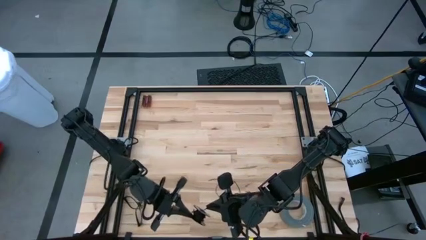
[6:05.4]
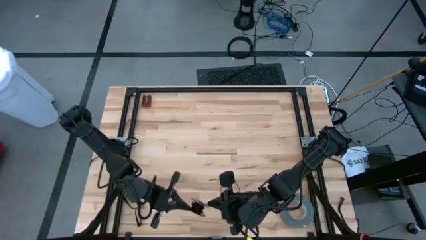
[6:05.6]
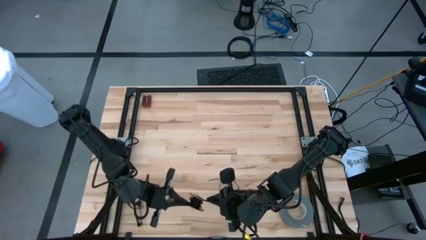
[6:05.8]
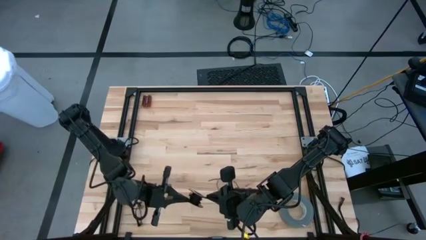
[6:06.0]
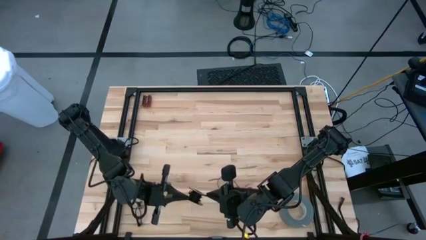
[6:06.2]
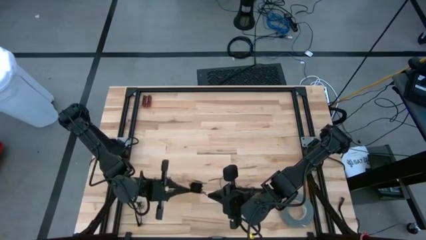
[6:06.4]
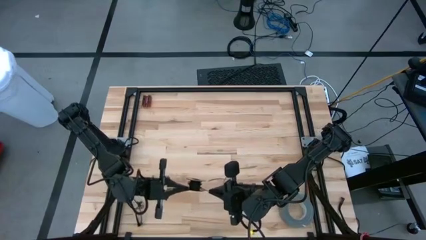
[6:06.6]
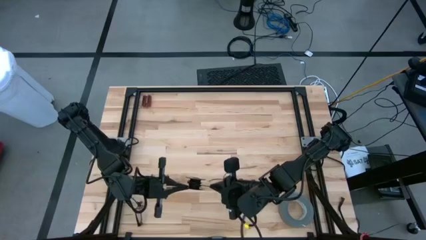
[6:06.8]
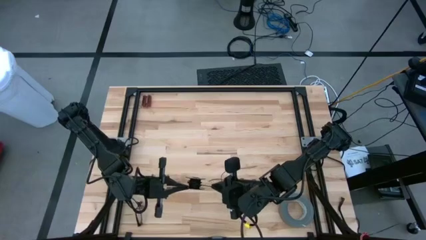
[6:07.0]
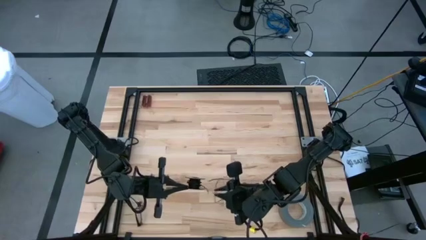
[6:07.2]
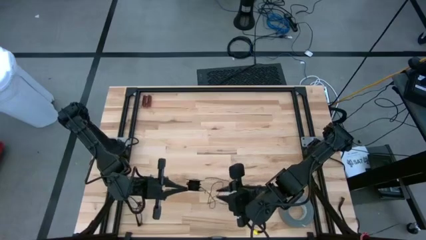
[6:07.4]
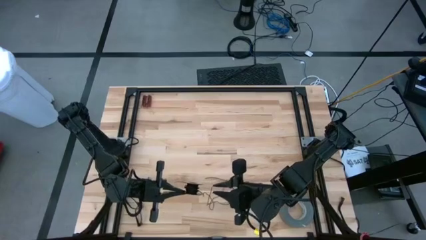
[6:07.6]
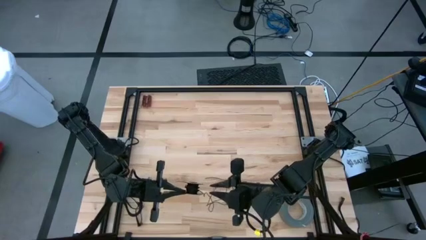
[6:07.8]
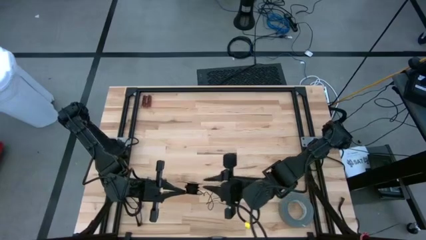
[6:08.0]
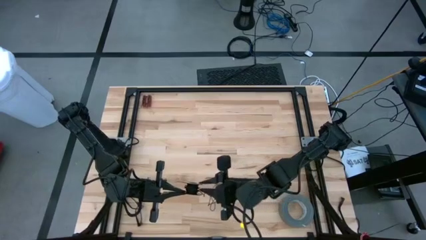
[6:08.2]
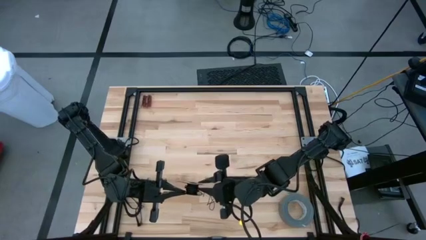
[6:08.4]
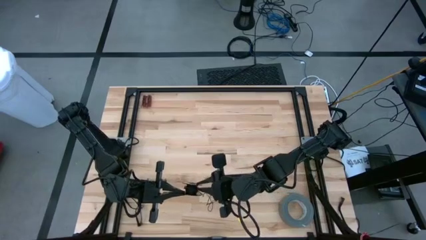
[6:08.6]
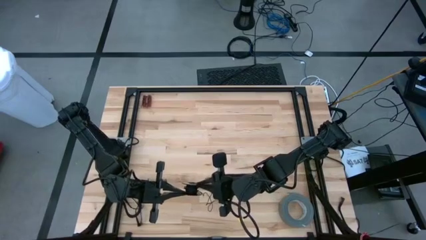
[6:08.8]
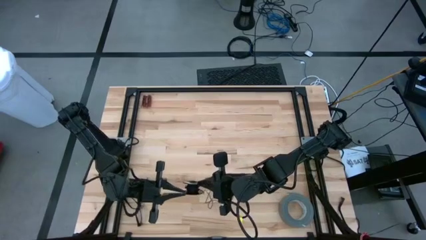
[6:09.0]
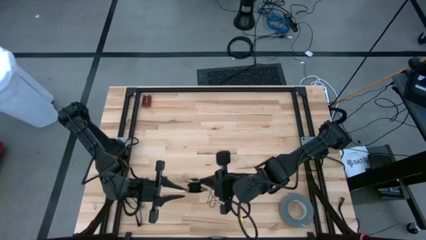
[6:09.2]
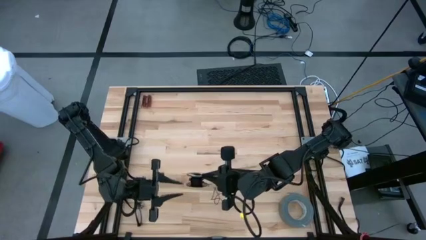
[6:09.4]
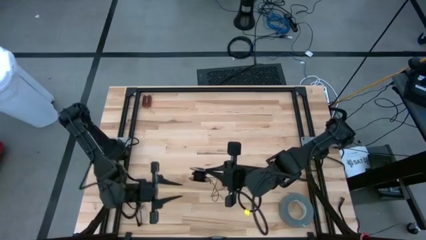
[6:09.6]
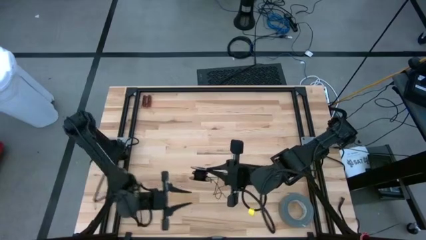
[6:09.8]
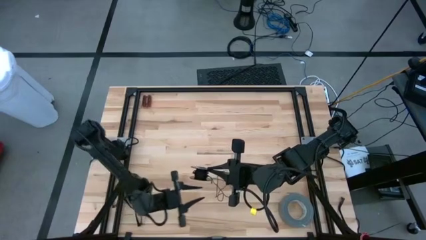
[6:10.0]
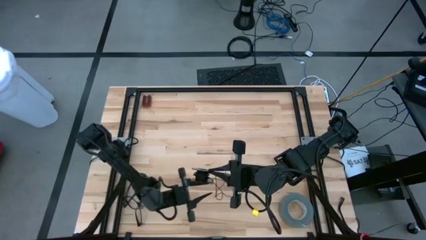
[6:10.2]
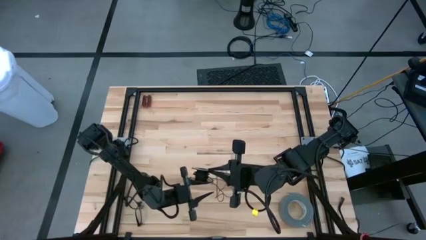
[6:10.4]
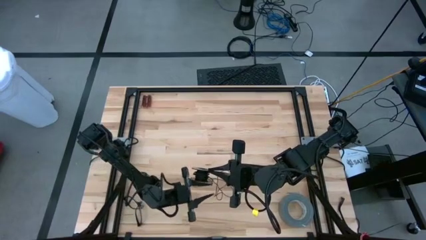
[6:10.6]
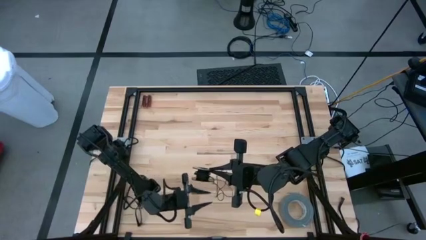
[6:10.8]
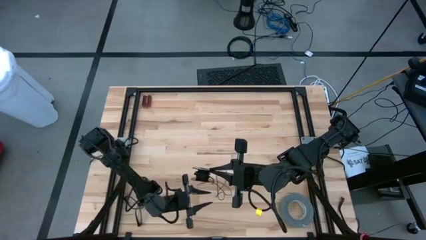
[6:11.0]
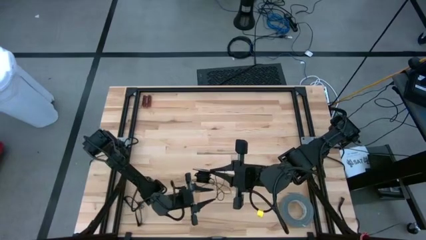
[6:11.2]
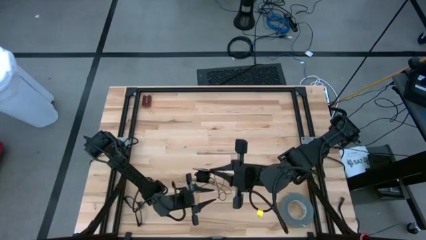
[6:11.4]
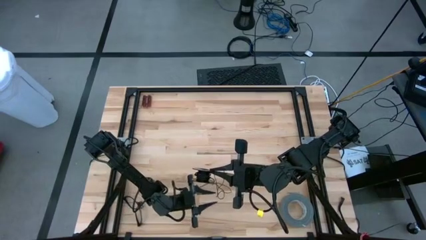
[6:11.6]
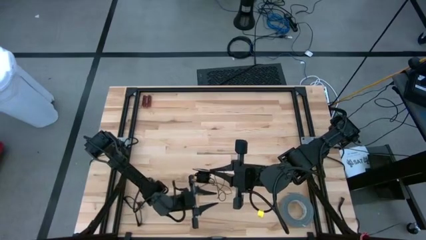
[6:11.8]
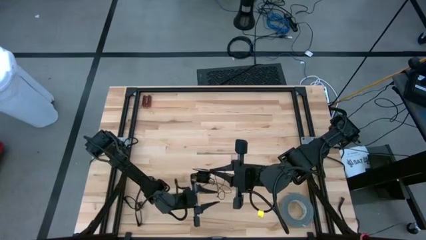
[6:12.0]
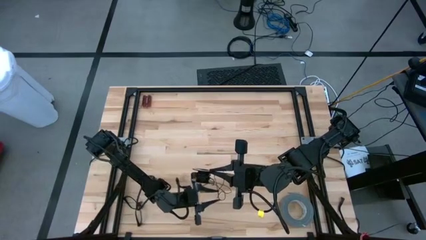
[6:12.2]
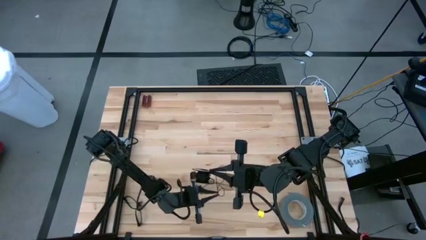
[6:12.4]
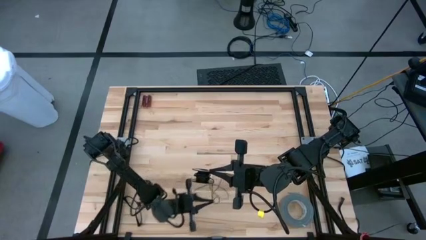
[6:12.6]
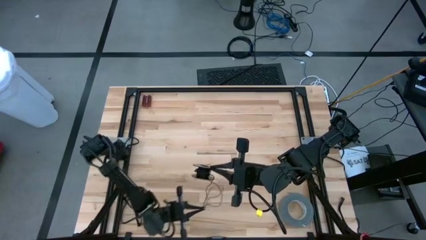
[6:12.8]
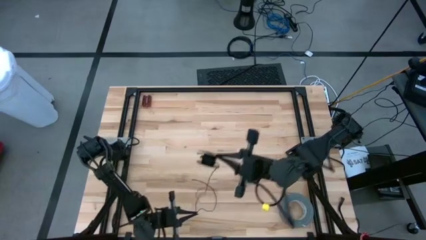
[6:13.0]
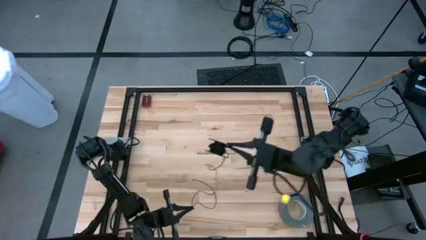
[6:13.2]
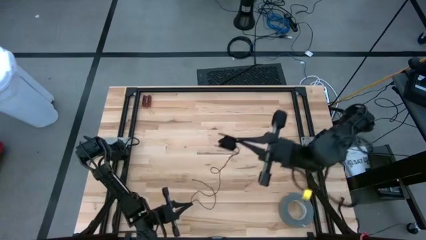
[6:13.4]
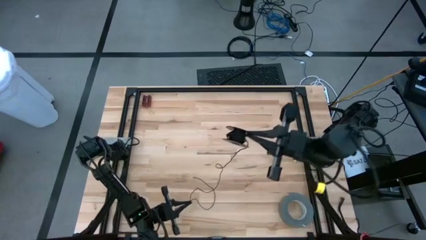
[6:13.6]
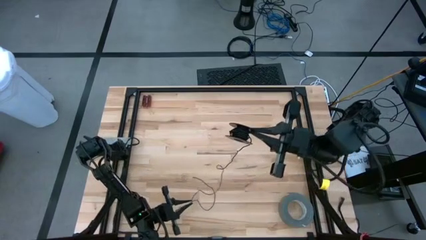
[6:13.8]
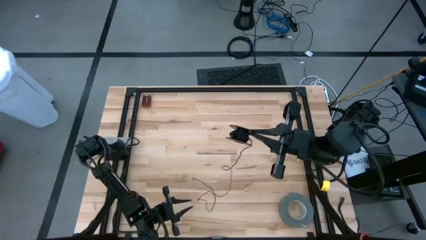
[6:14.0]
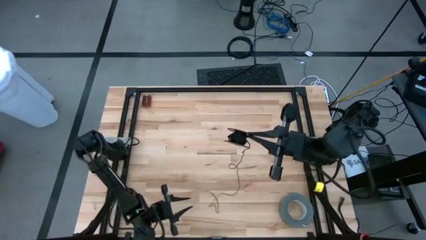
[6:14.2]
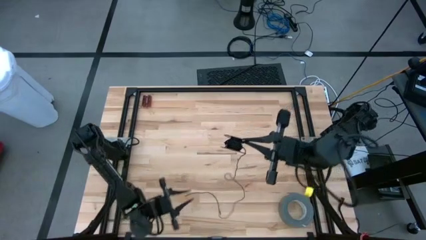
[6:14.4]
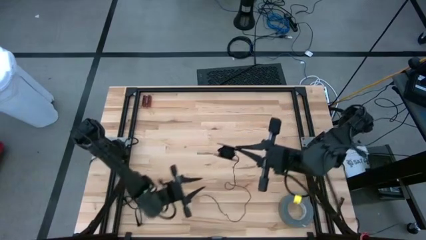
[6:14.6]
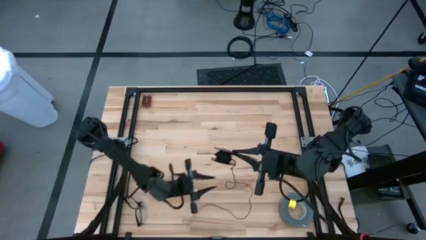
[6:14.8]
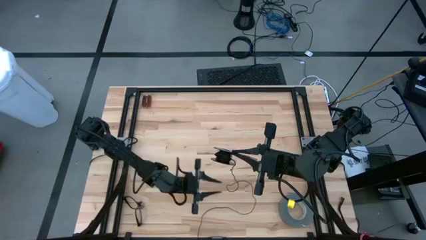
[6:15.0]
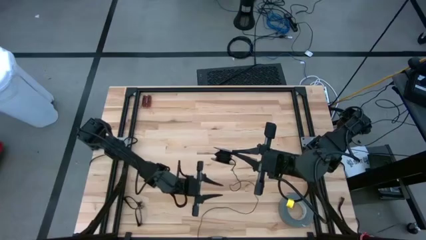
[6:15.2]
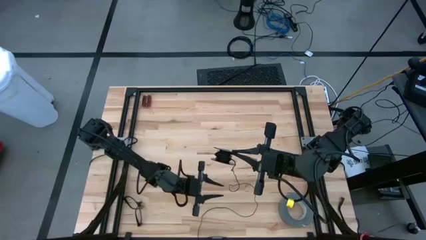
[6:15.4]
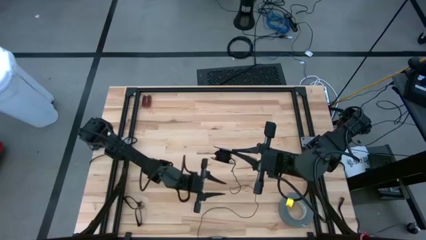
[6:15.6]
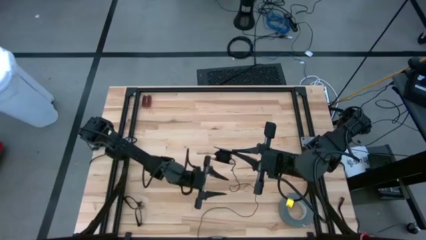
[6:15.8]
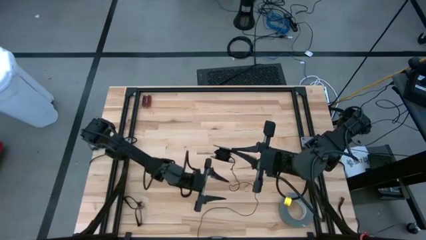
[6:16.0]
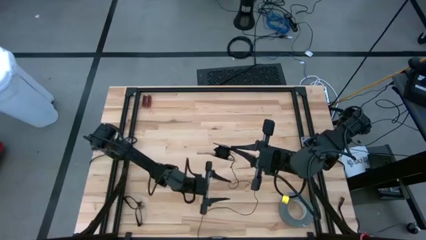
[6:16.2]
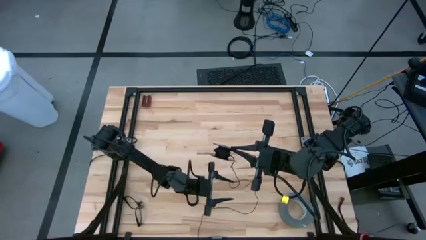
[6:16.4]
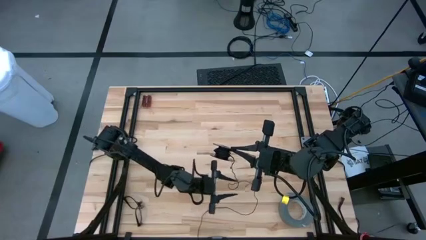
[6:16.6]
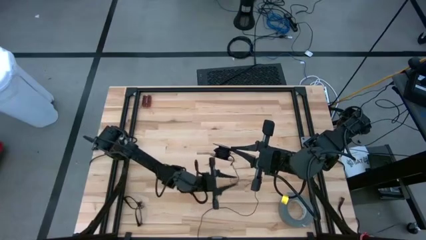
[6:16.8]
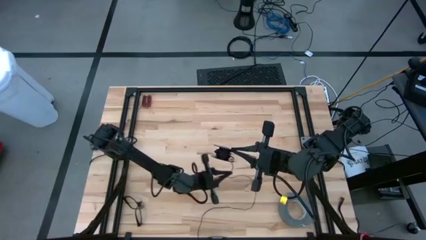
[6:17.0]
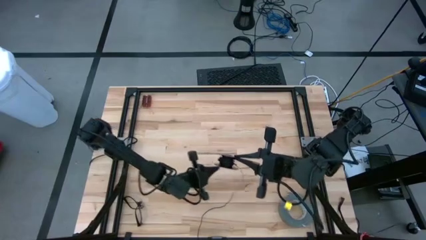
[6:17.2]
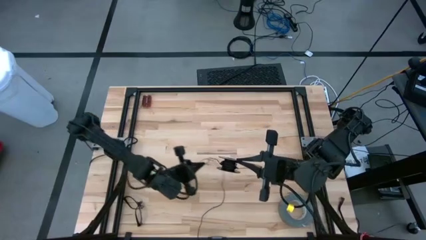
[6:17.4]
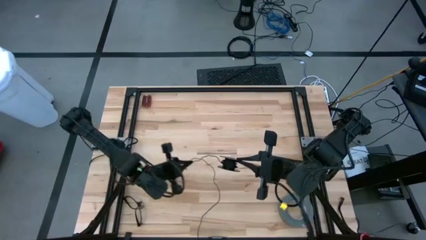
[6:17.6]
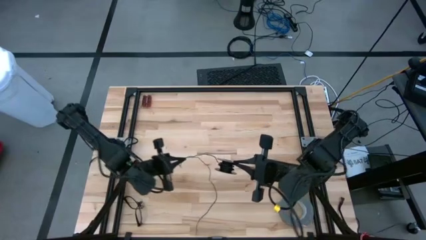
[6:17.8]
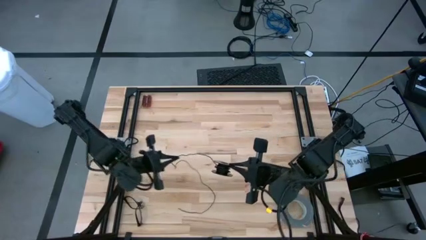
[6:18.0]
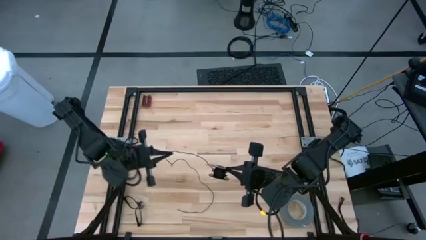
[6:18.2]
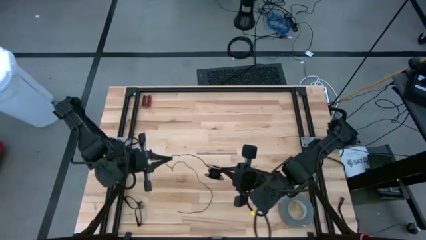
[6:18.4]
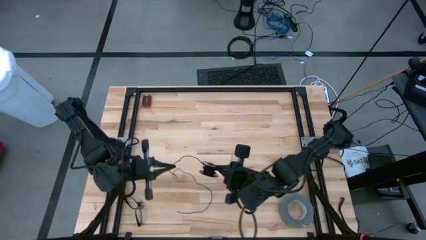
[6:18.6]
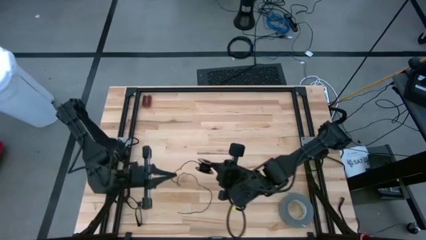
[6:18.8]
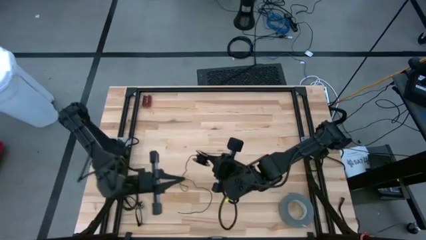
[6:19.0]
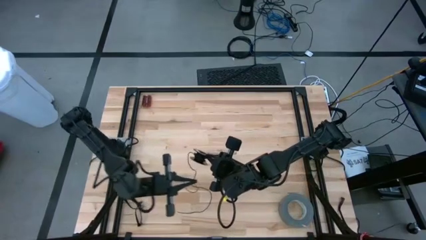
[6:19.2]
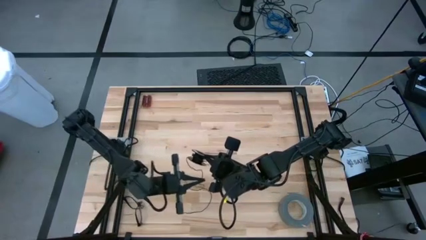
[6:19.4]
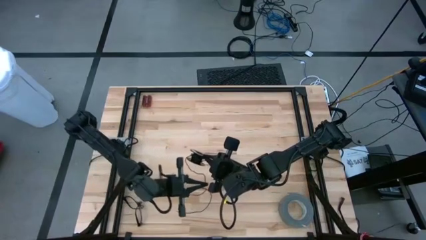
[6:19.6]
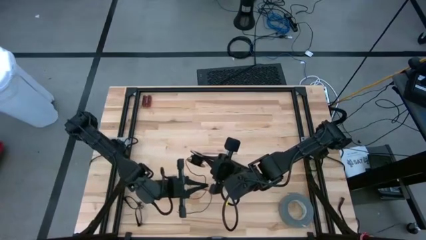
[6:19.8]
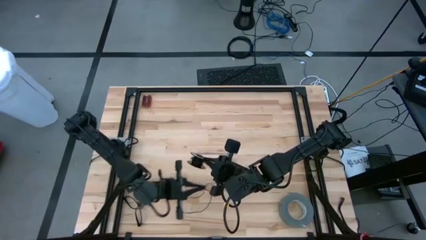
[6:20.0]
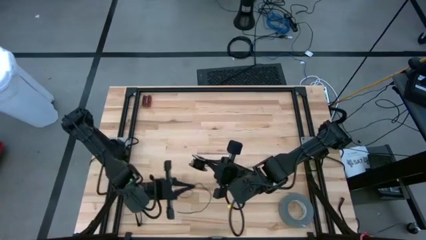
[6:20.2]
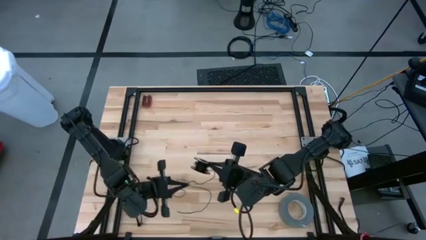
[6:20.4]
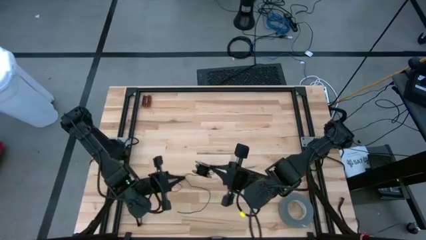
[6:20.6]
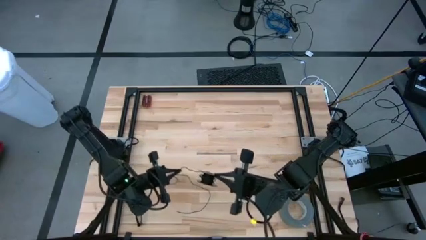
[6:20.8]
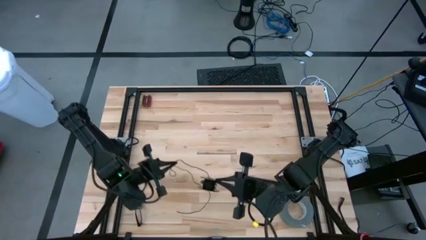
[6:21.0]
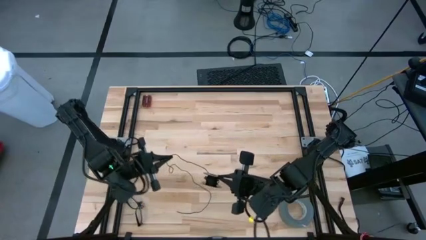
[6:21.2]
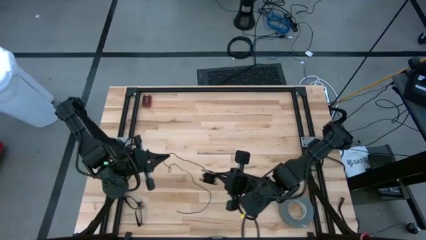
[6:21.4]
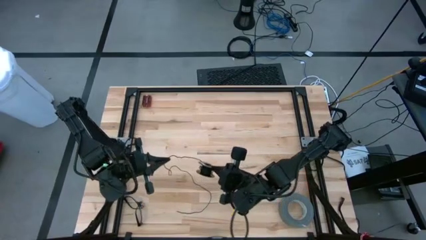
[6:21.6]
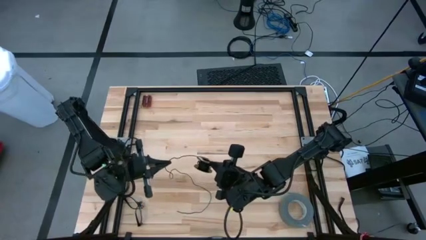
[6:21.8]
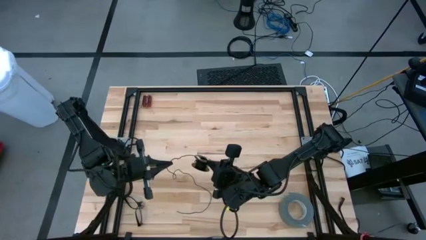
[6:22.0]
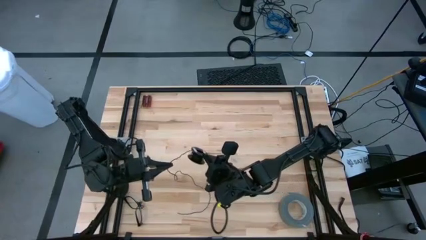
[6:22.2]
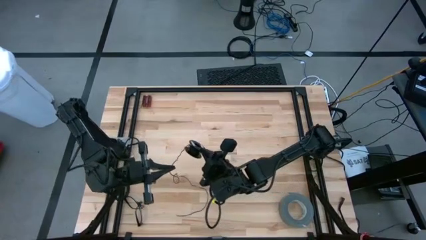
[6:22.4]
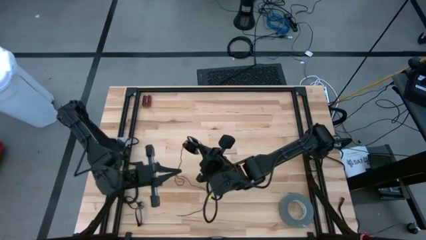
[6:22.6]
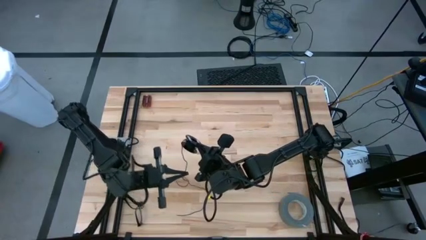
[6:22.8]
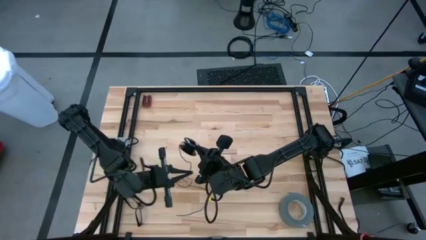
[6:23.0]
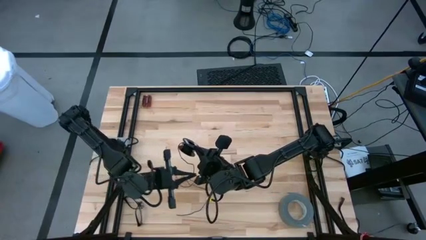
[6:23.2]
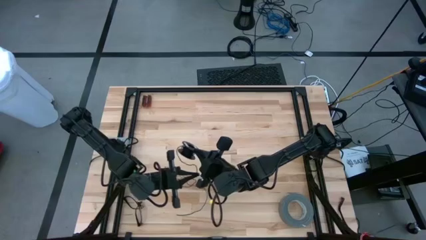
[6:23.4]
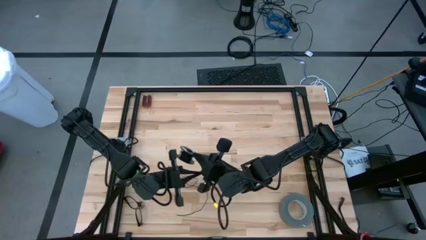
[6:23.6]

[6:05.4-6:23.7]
Task: Coil cords
Coil the black wire on the spool
